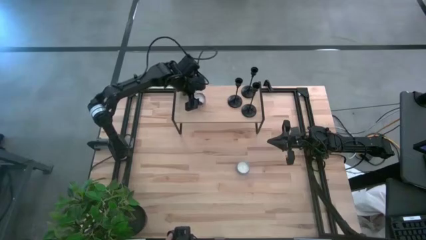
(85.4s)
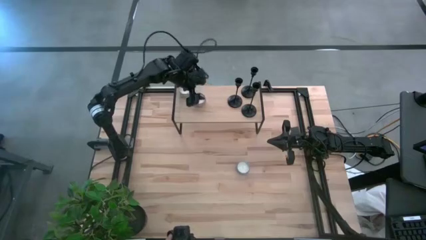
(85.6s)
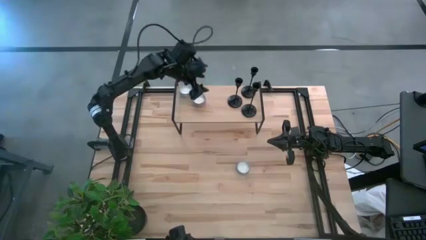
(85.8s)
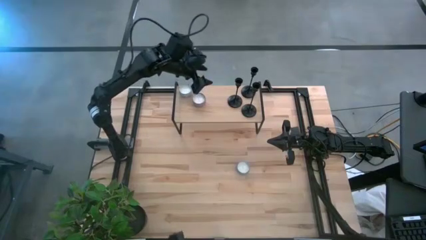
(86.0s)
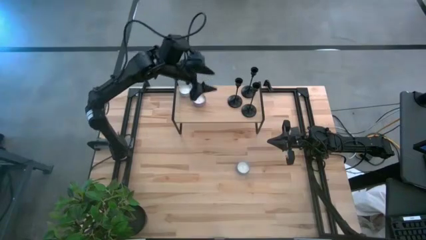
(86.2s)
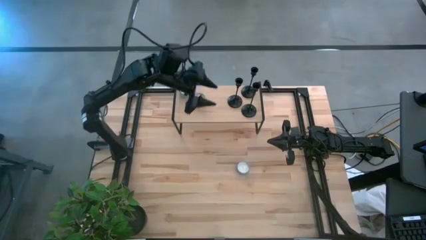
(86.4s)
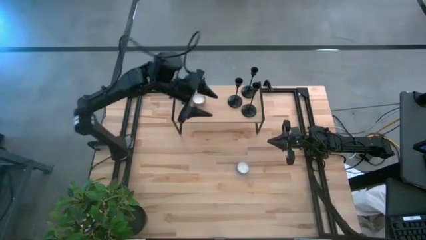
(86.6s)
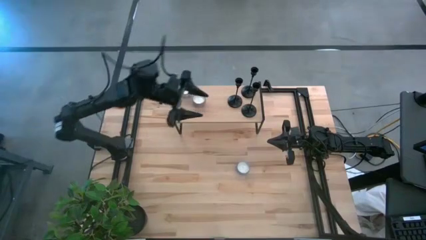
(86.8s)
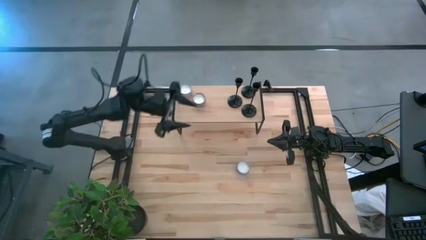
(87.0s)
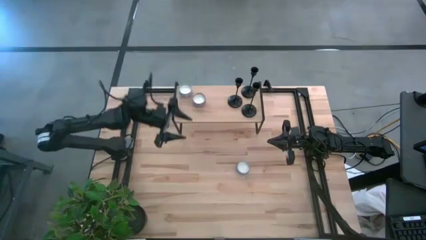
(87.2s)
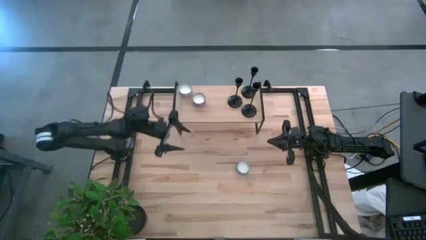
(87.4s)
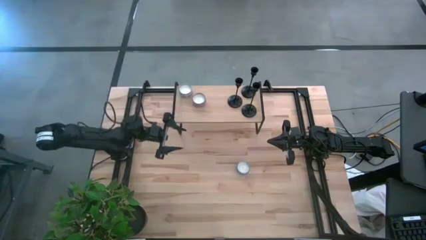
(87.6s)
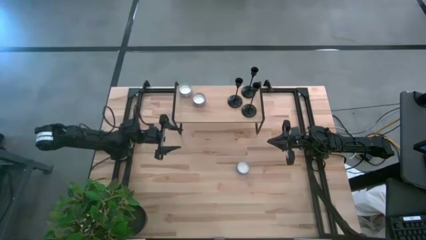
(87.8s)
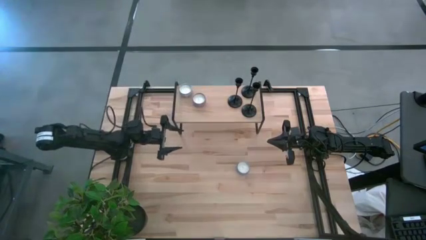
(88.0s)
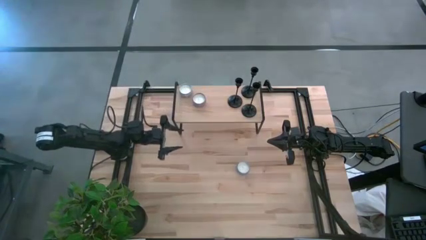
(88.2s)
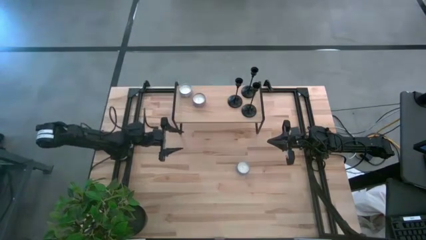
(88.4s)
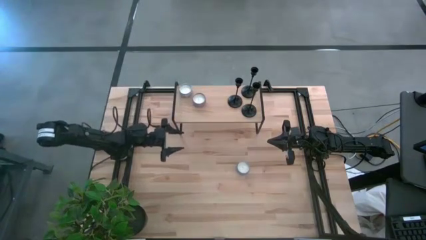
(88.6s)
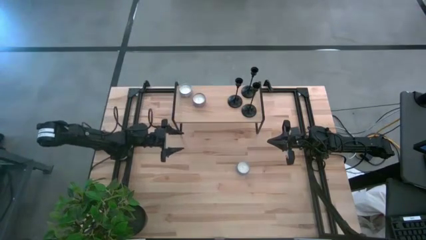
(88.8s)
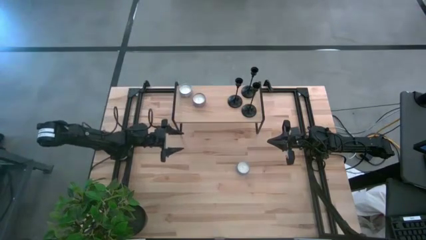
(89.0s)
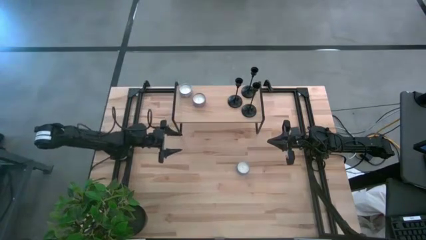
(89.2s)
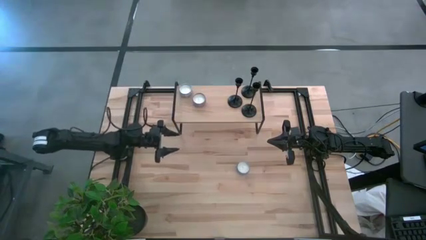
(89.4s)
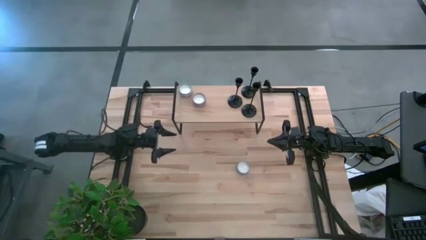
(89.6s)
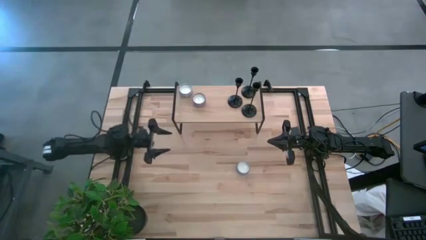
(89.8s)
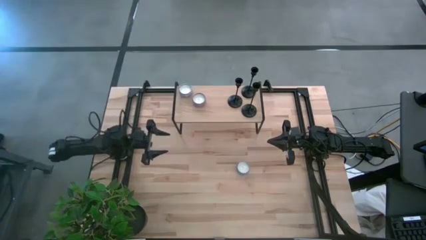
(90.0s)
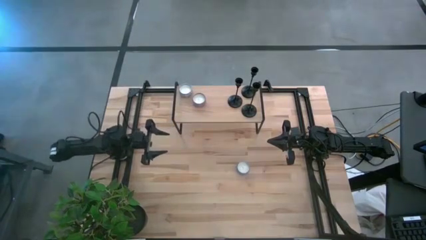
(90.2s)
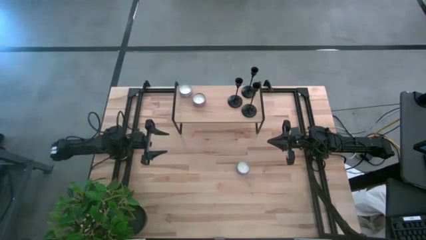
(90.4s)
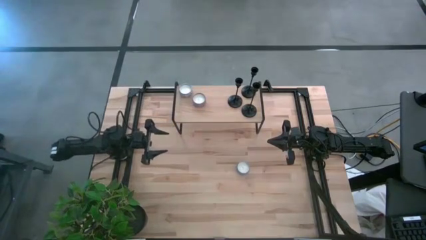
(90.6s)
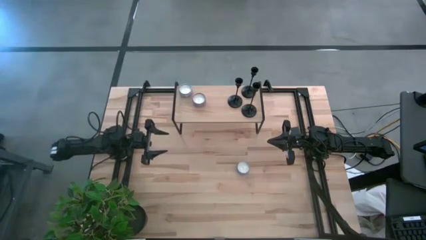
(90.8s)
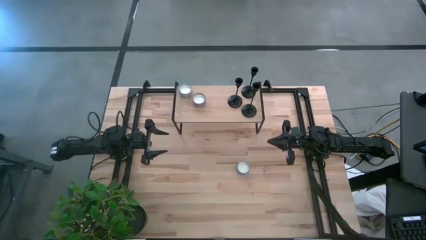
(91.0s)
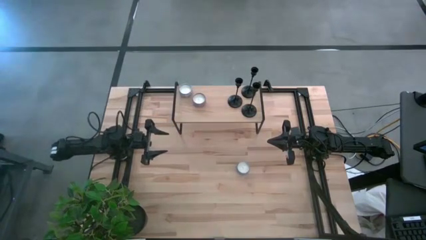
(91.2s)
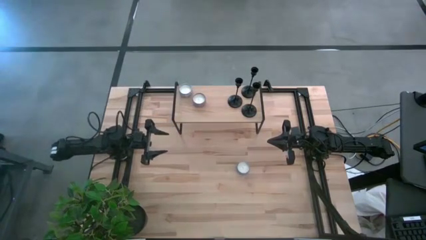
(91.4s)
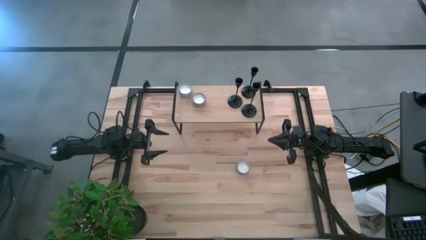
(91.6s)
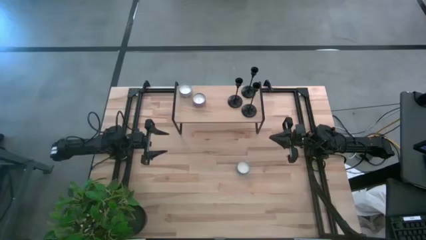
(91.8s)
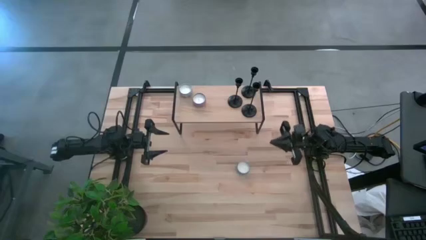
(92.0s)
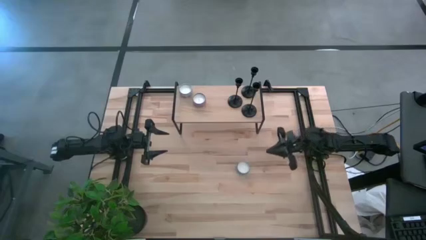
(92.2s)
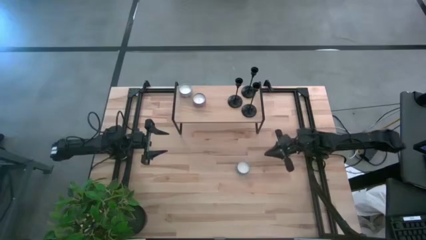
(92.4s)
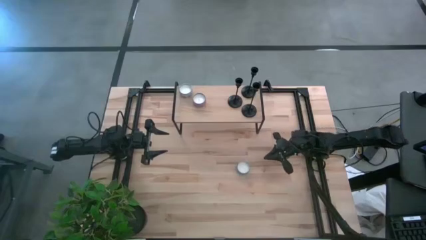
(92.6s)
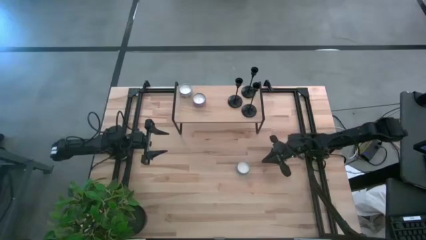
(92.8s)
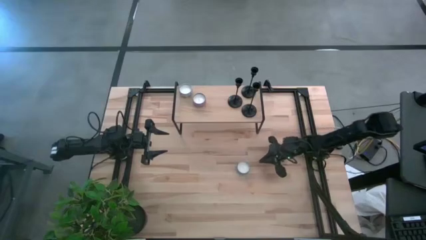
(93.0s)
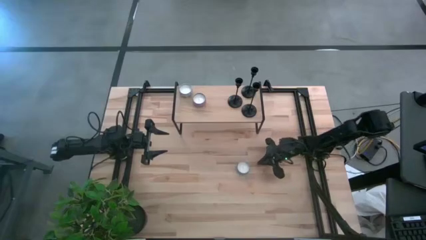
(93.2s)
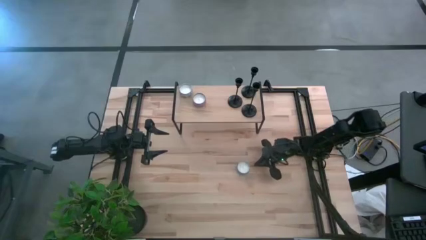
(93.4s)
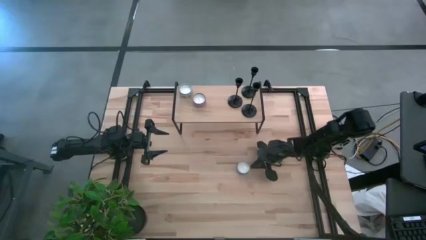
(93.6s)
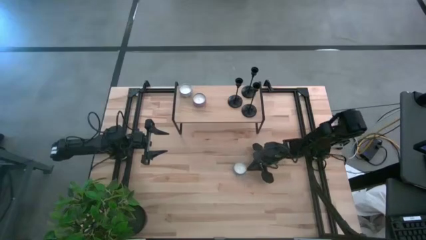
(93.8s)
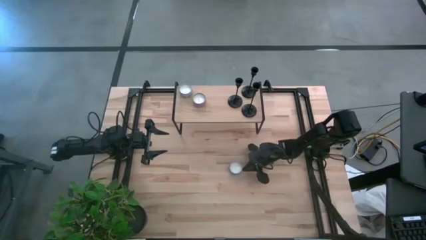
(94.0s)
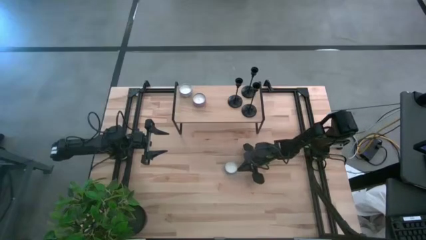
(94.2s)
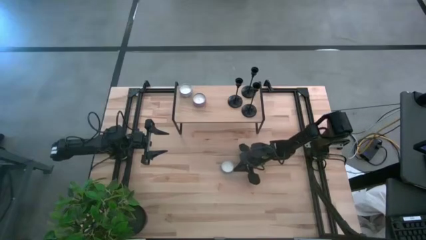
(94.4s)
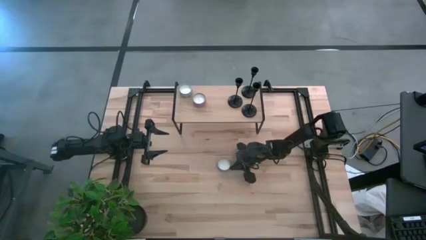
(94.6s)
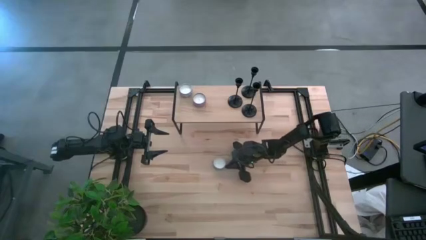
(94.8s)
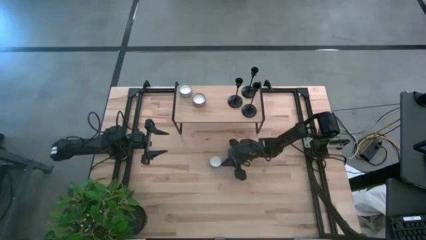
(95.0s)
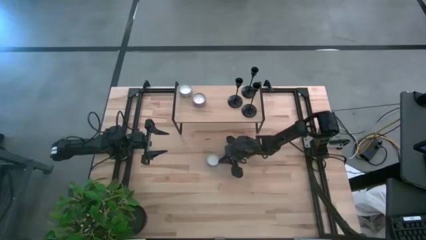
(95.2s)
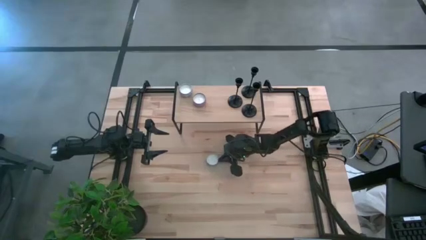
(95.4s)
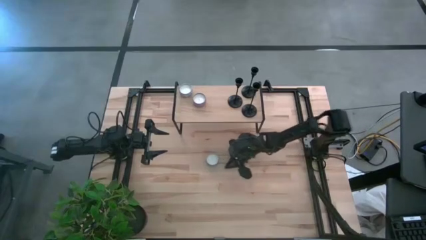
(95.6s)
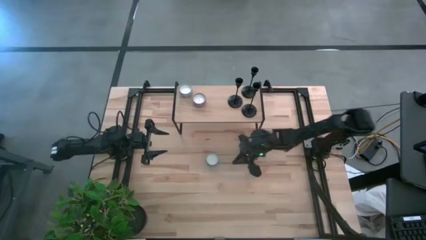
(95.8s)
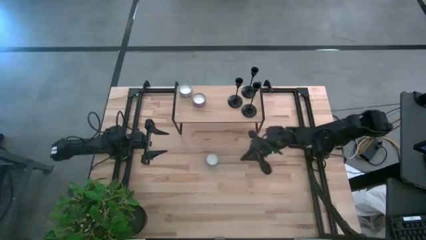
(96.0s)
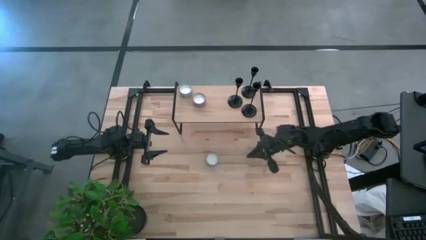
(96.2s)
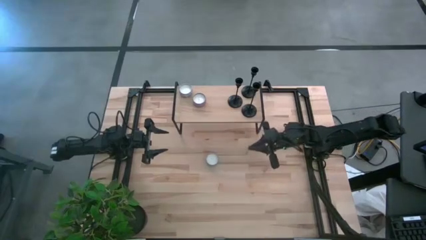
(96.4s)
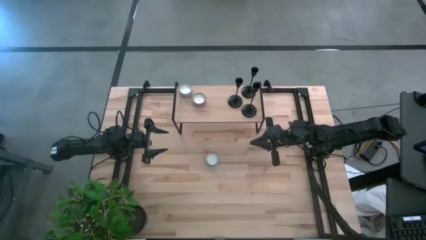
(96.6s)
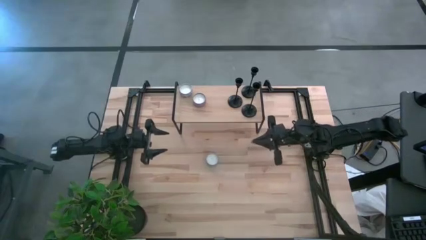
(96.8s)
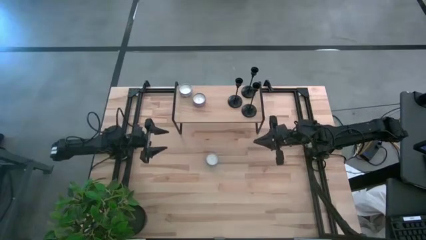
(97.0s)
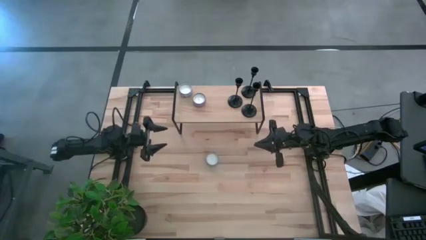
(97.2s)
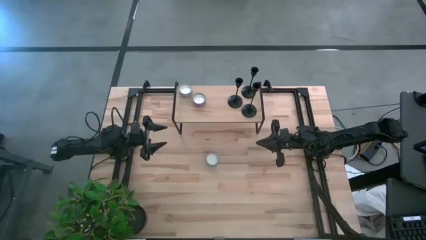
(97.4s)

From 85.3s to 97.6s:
Task: Pick & Place candle stick holders
Put the blue scented candle on the shelf

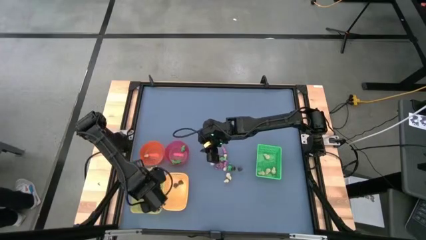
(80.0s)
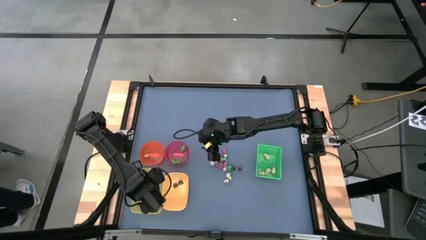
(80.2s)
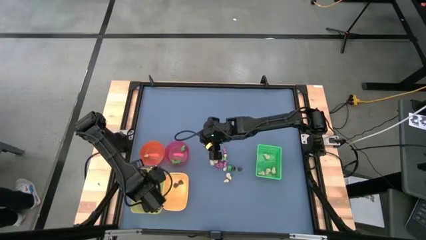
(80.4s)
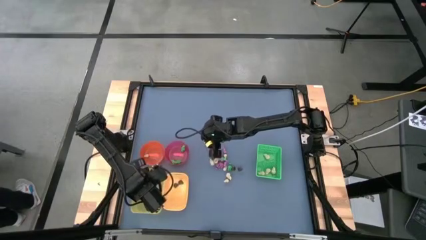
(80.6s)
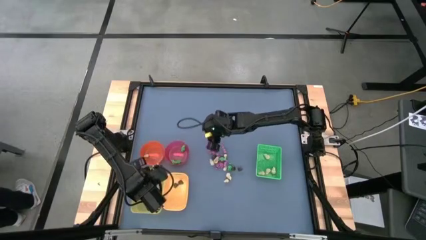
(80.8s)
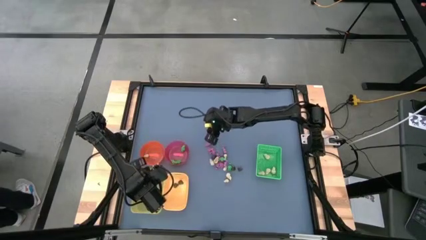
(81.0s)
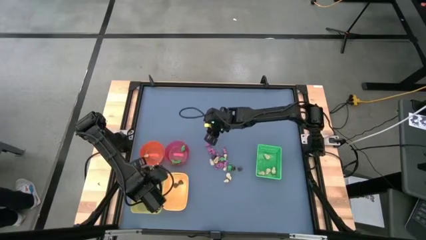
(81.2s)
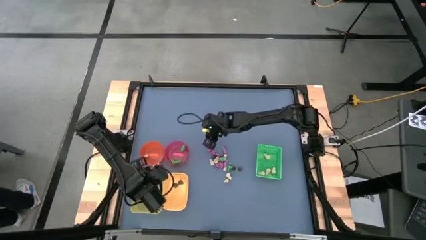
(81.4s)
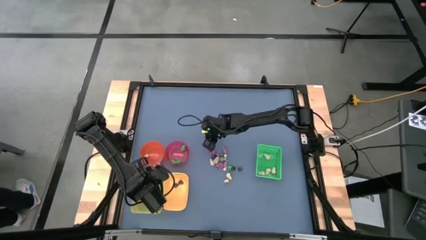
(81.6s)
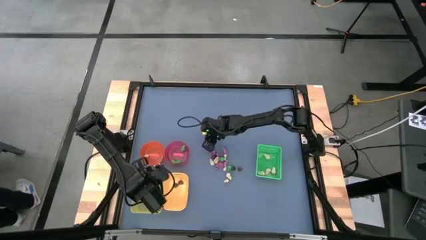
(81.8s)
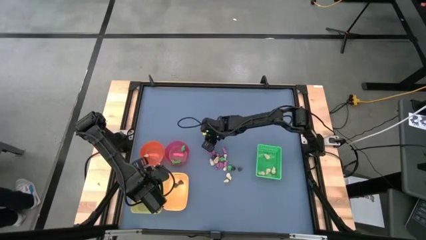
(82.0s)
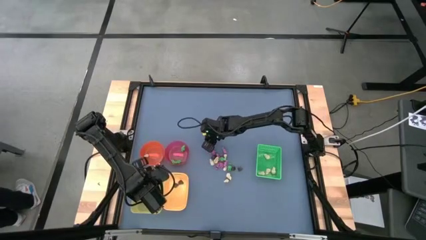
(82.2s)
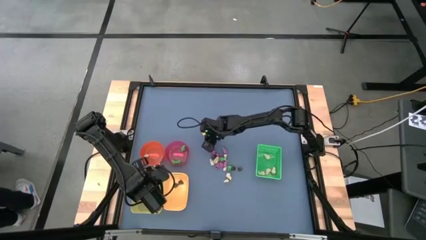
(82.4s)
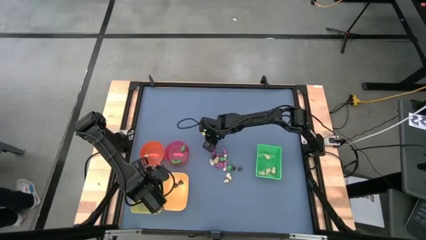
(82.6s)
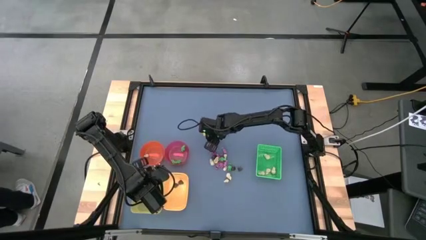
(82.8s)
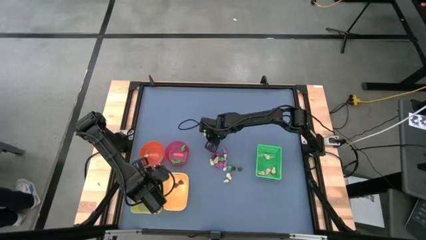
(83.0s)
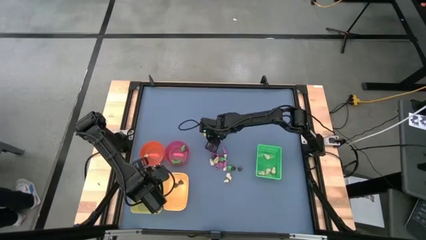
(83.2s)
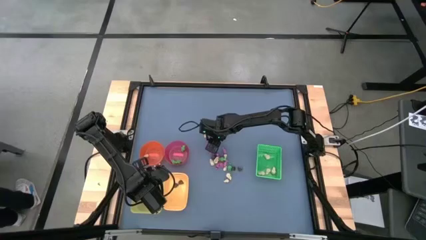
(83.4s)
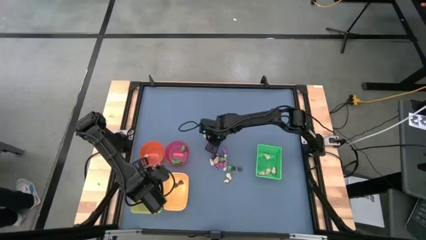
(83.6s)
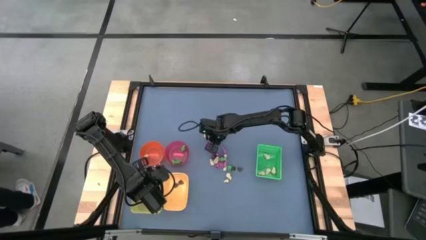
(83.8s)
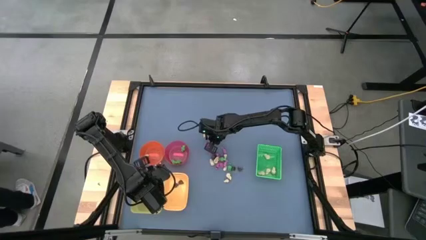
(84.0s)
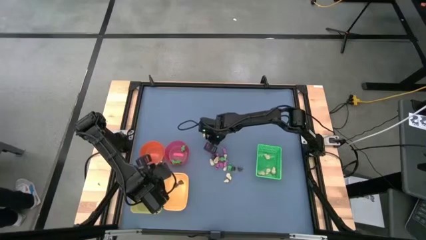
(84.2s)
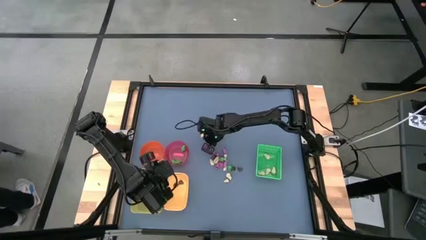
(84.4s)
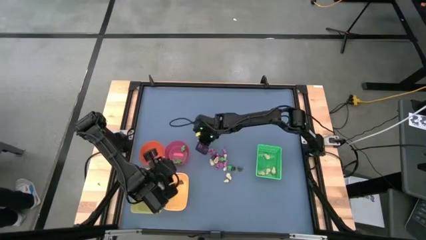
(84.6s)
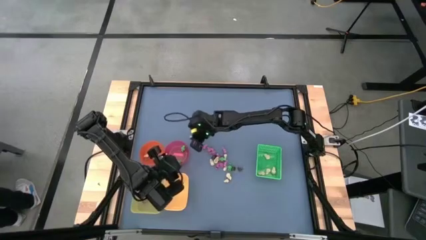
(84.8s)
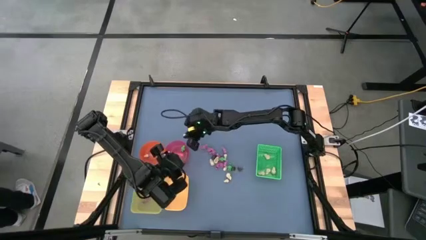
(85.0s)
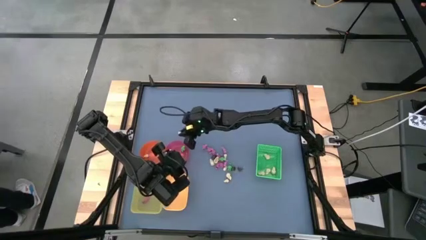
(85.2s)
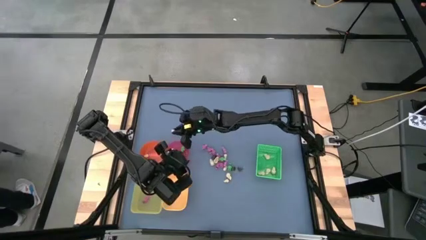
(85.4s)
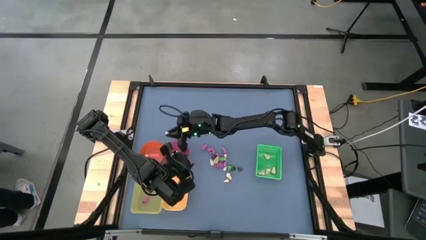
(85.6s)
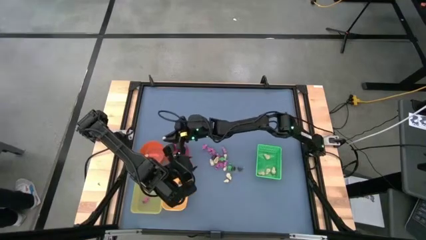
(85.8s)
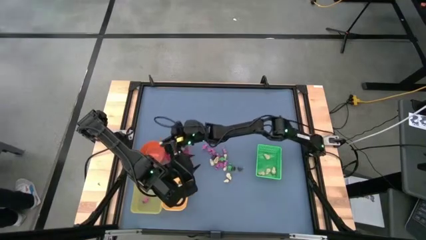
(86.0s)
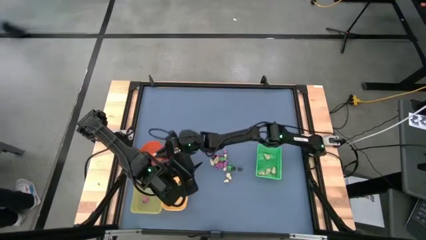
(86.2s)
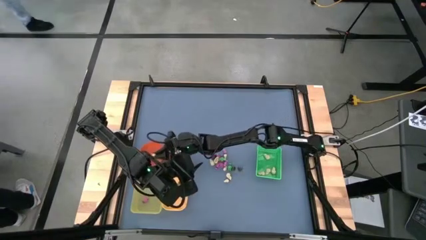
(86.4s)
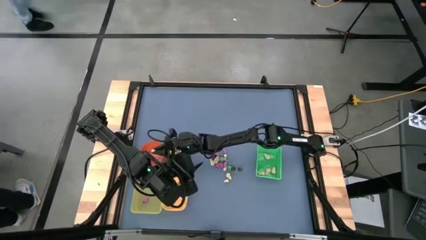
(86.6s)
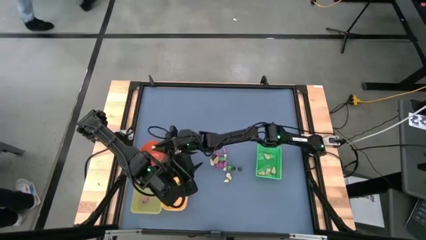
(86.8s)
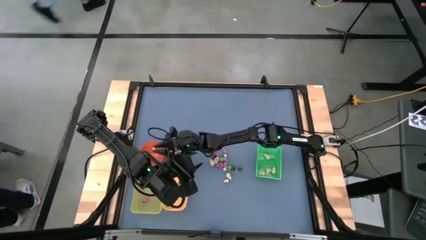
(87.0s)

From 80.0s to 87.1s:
Task: Sort Halloween decoration
Put white skull toy into the orange bowl
